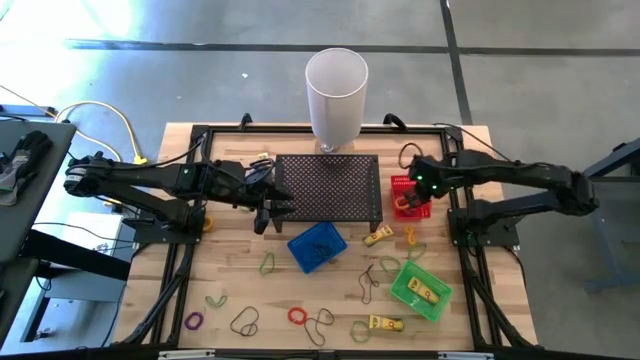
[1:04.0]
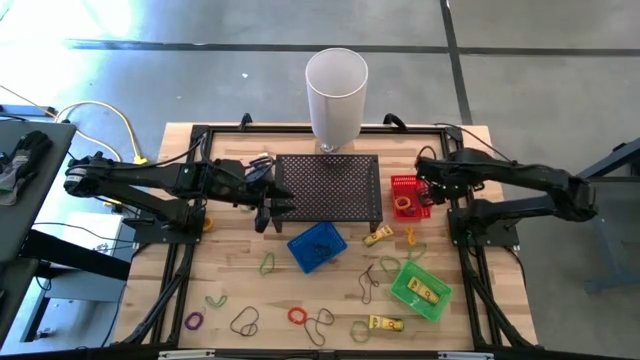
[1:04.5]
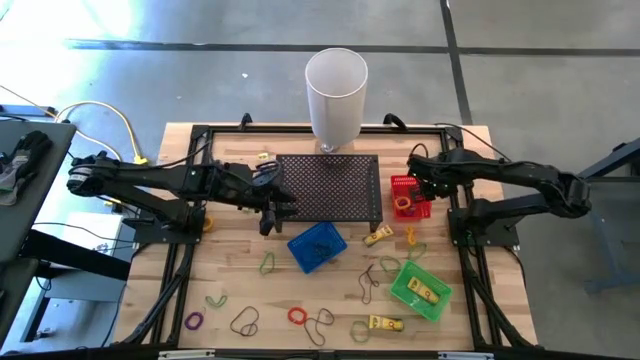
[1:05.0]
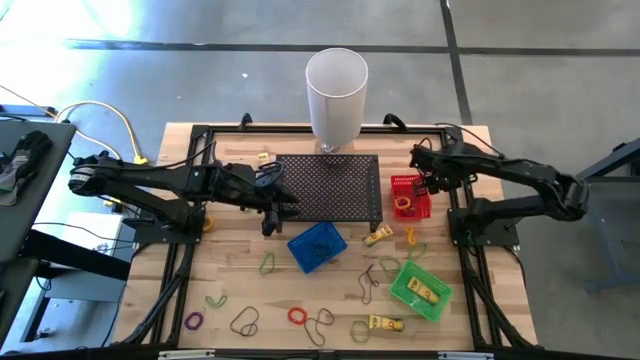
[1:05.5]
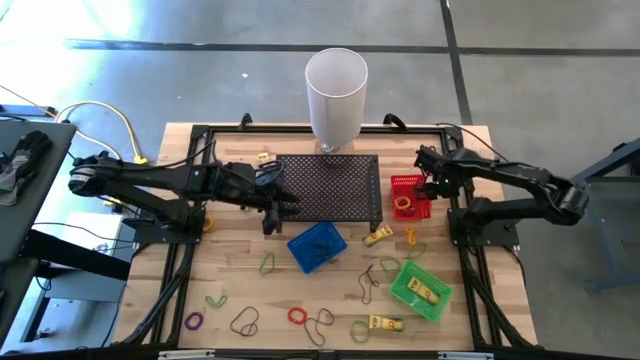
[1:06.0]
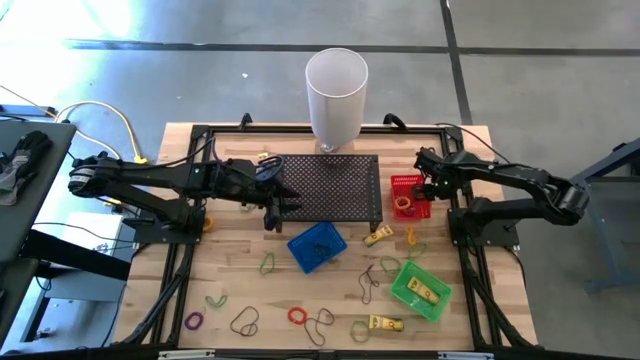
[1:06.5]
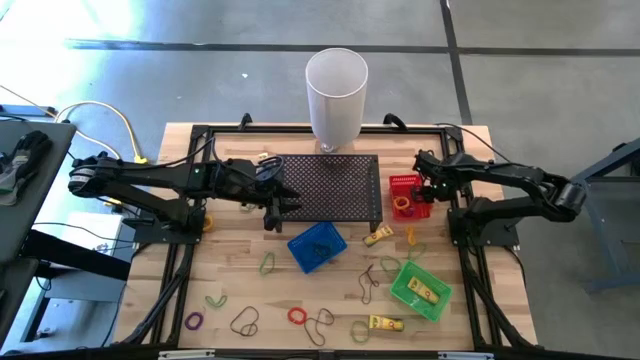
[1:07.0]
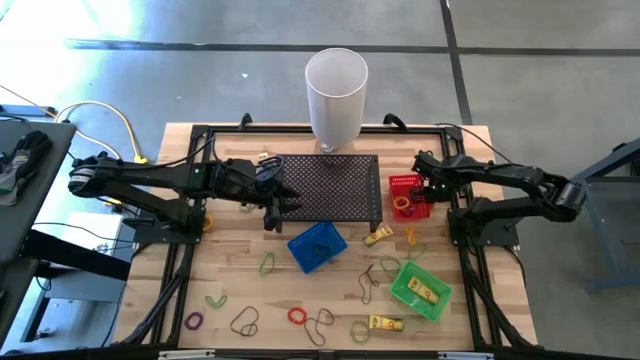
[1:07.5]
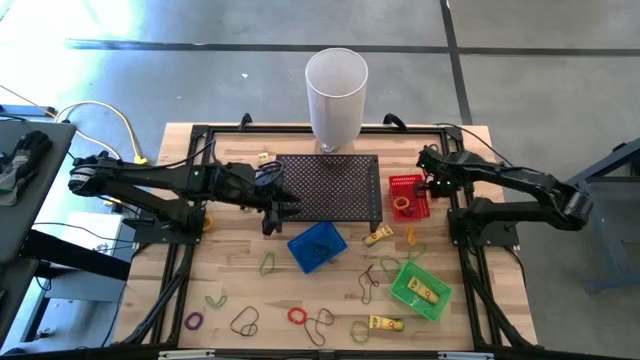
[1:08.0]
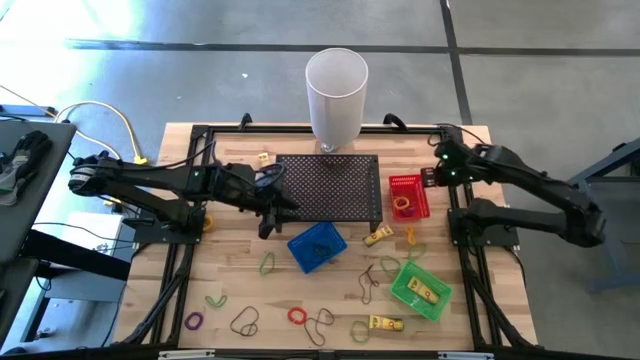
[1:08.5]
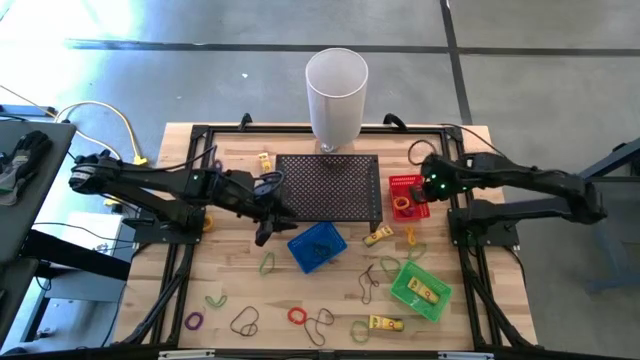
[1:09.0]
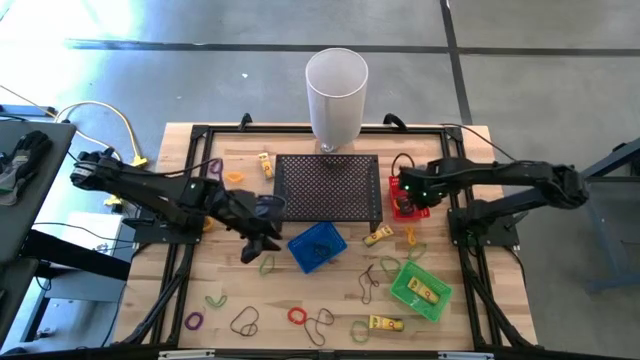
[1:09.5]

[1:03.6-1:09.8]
Task: Pick & Place Office Desk Supplies
Put the orange spring keychain into the red bin

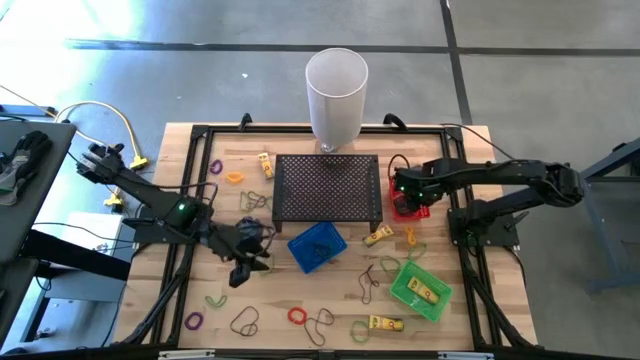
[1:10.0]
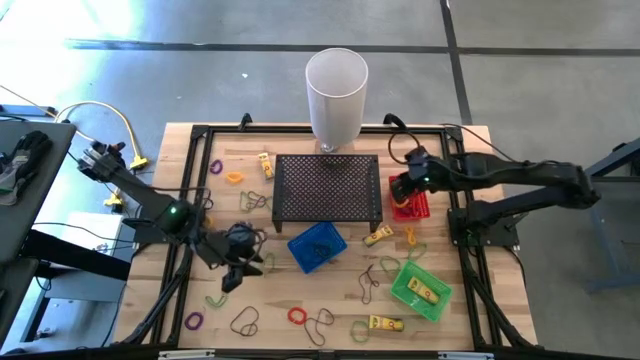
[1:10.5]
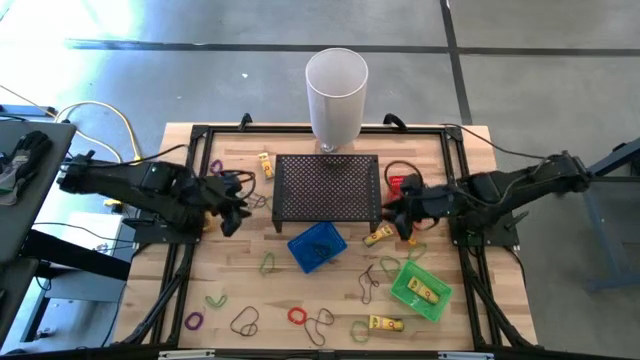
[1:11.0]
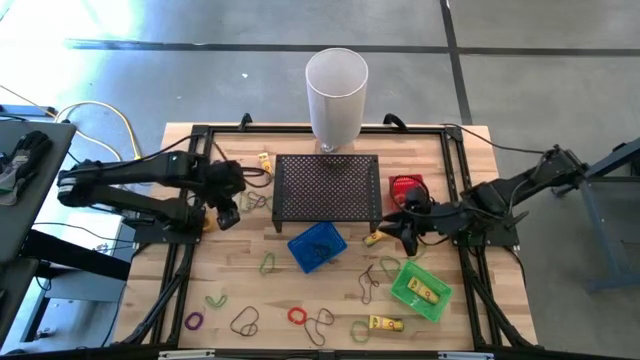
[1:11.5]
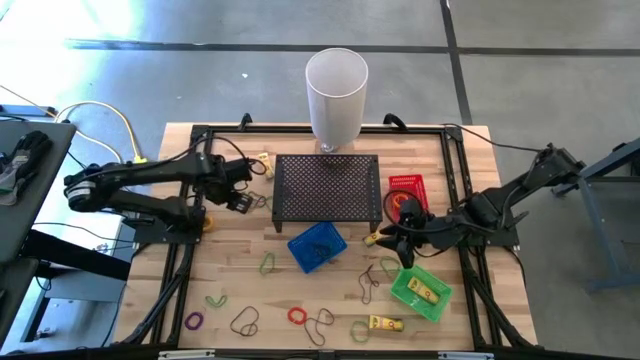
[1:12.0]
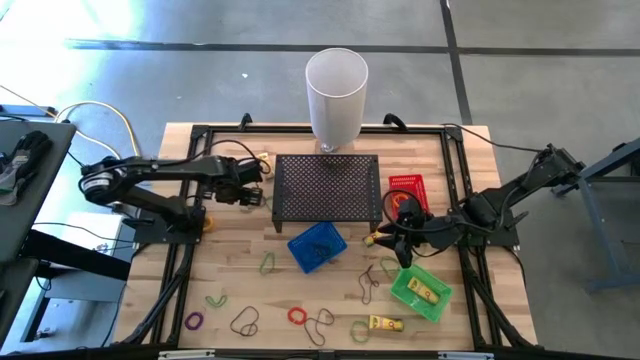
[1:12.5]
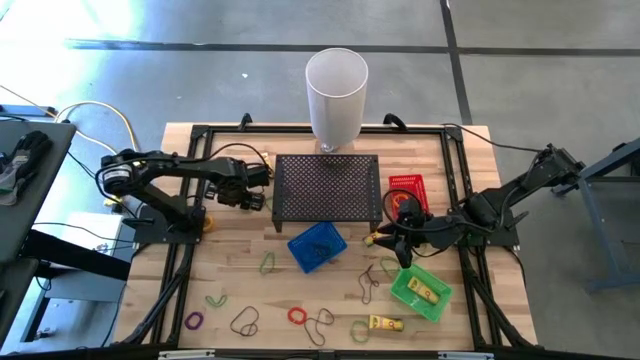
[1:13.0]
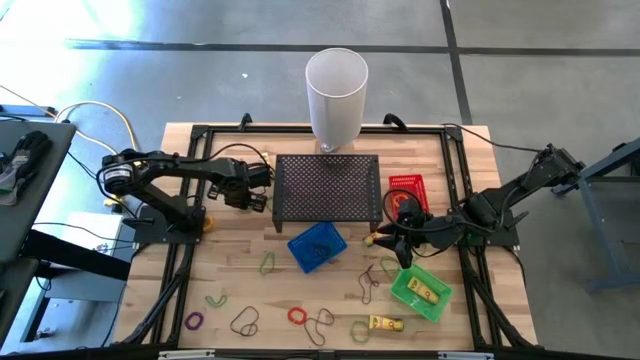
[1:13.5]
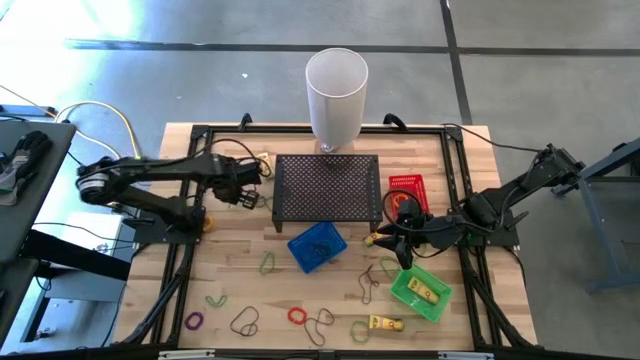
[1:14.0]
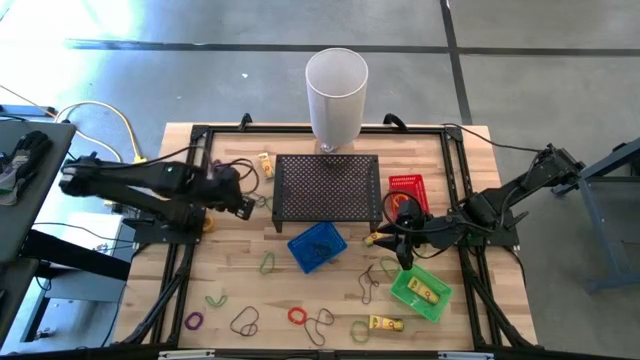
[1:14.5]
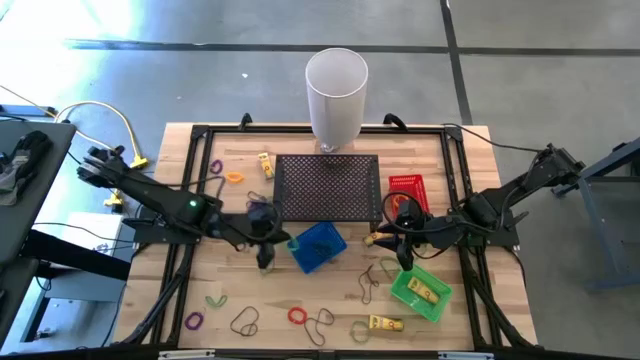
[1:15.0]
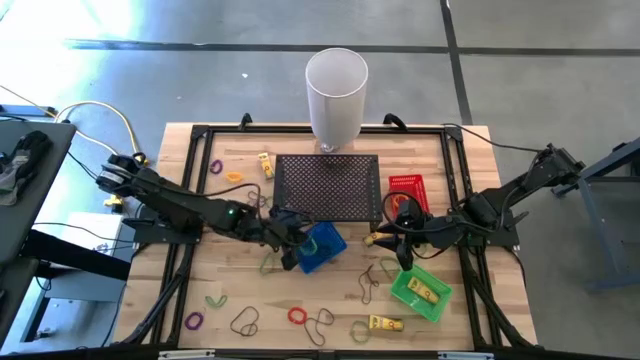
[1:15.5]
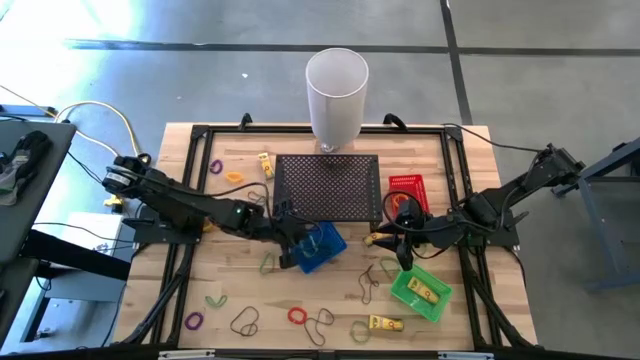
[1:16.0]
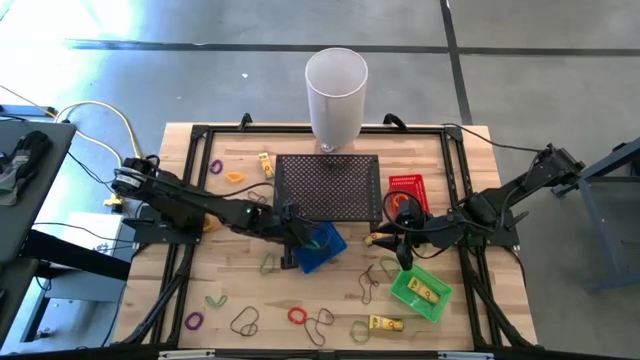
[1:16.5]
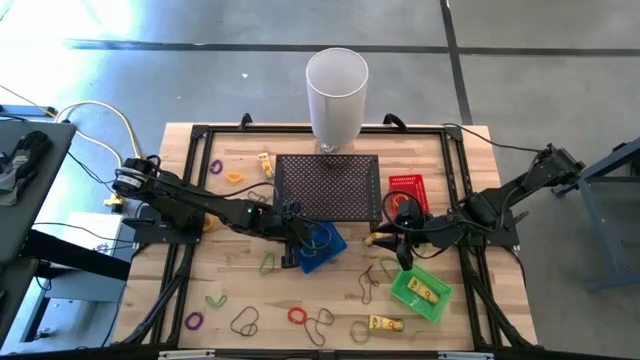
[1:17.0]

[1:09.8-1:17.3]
Put the green rubber band into the blue bin

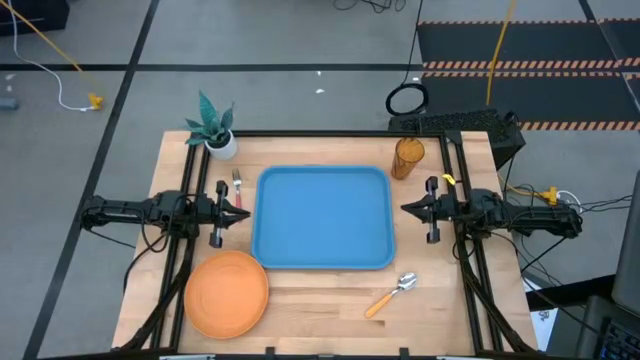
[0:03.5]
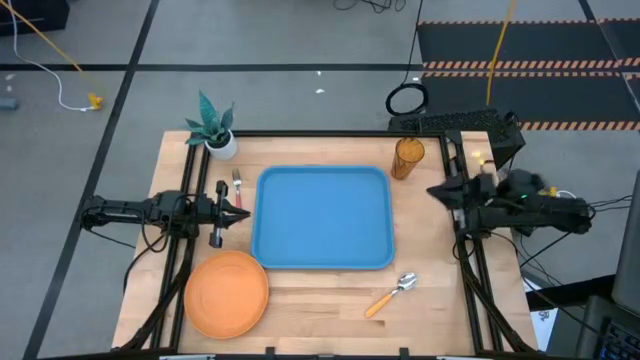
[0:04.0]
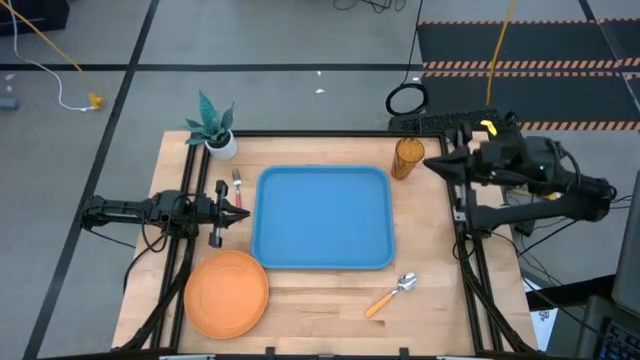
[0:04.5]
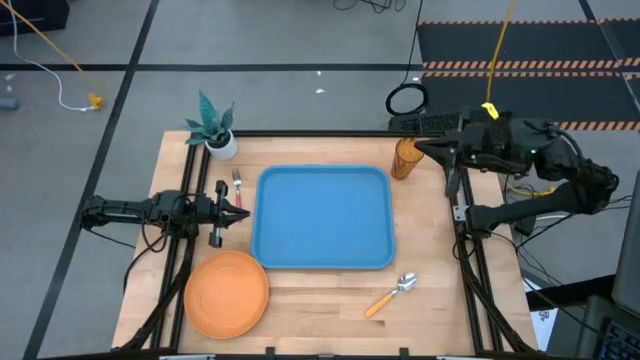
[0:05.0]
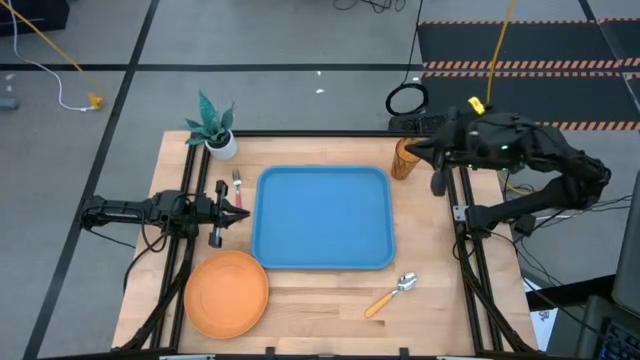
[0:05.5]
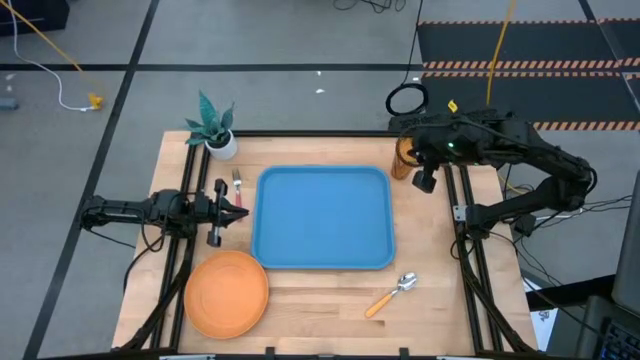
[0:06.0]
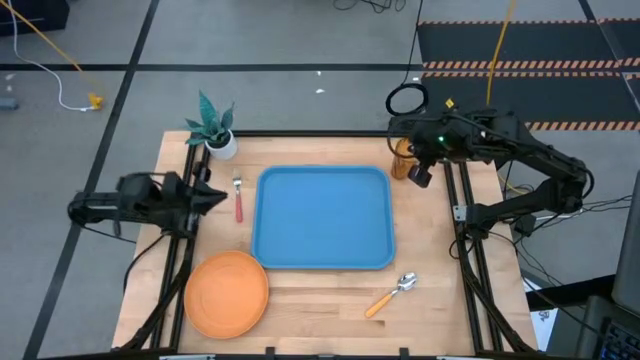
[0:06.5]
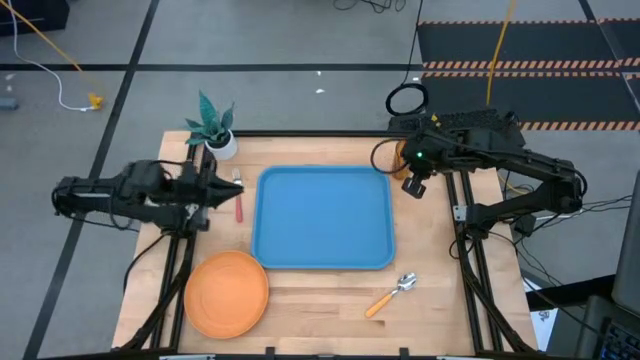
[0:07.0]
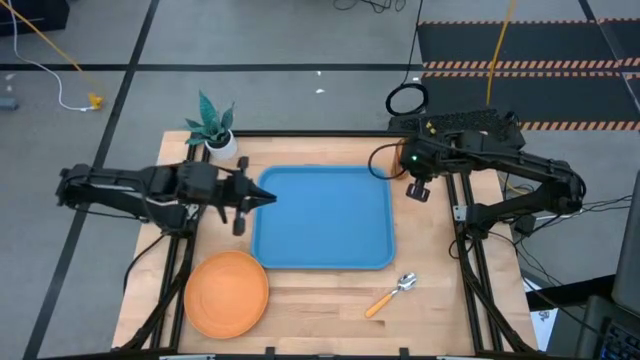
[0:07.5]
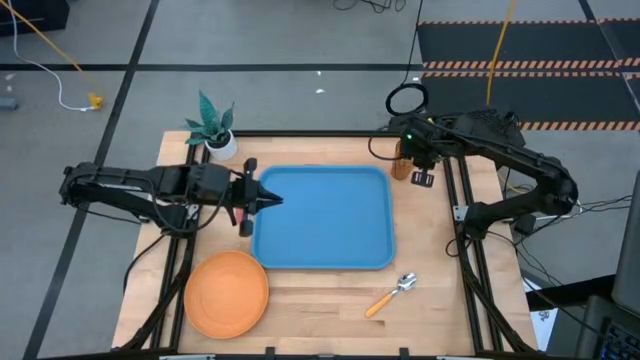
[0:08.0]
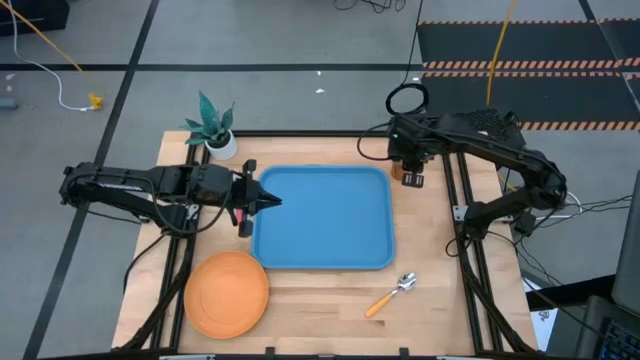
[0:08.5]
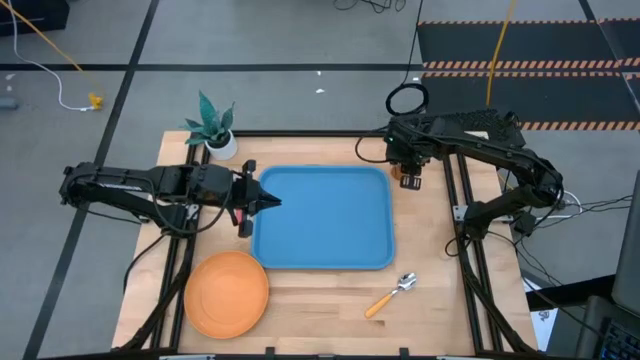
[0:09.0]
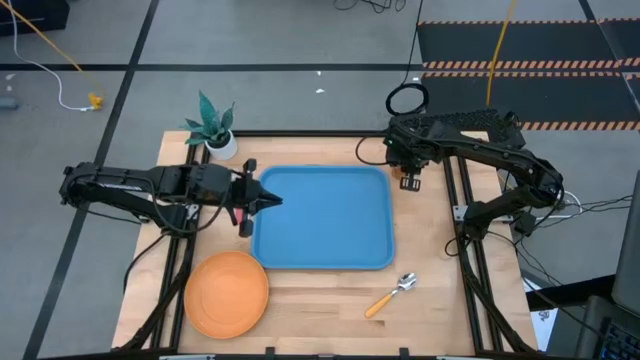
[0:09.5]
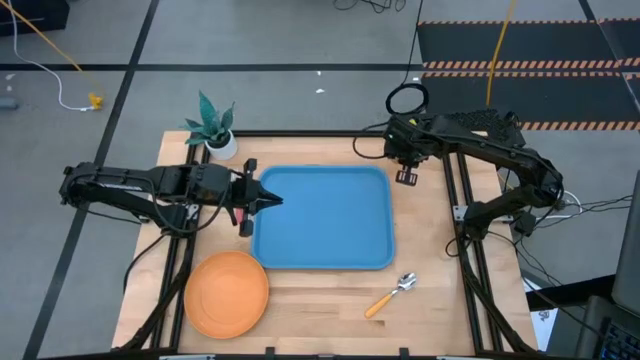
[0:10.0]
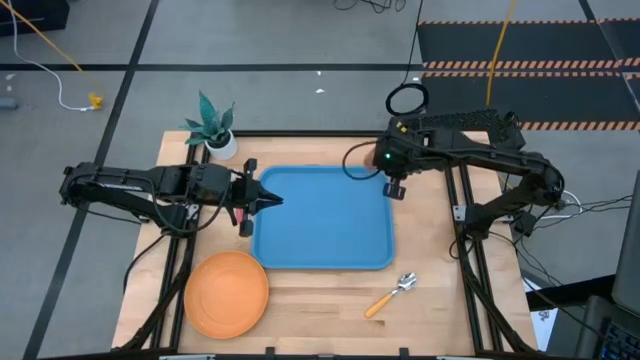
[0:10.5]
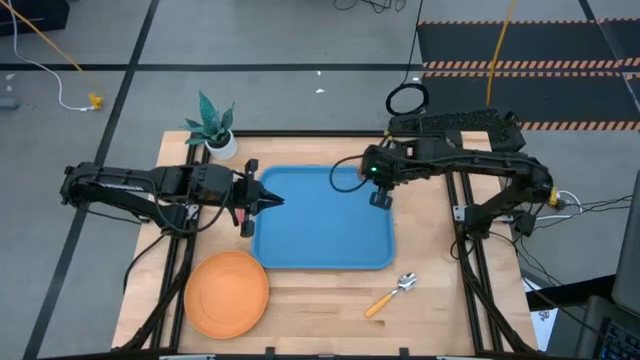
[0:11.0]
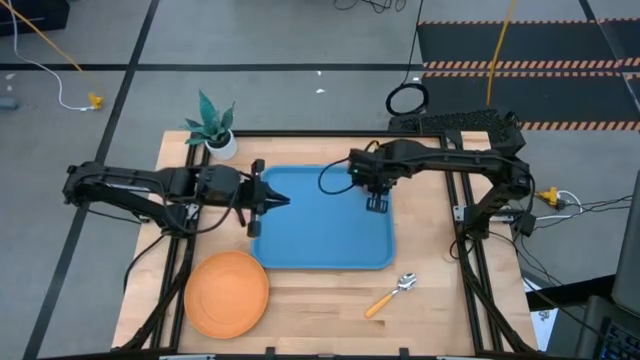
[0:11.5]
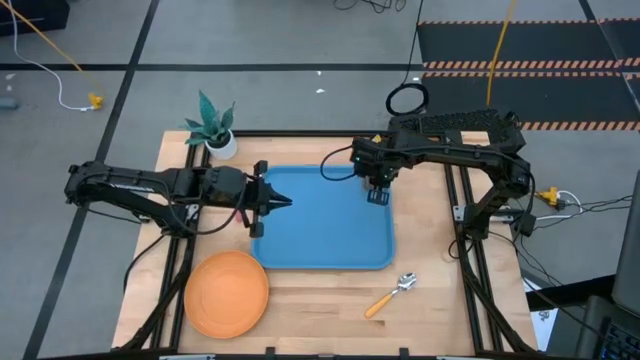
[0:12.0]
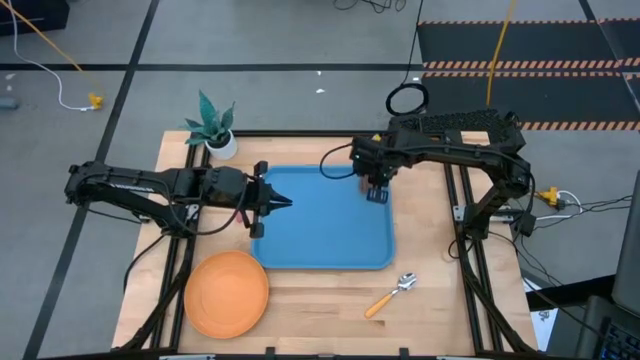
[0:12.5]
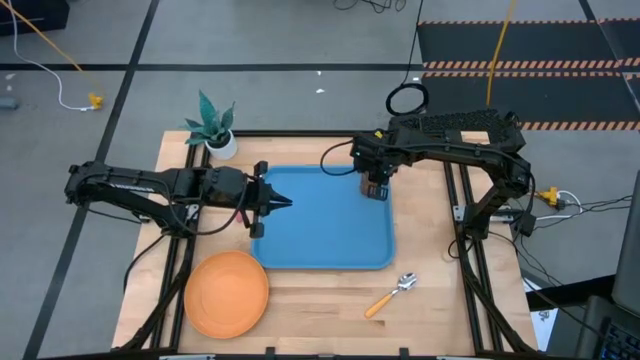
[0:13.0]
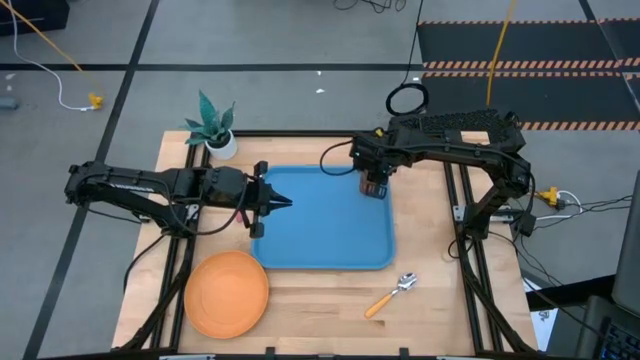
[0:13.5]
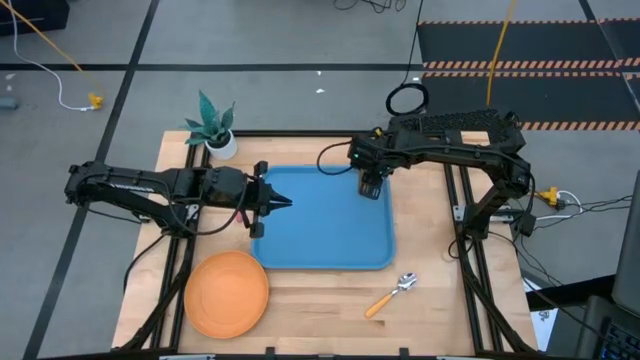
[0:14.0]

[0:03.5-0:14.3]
Task: Pick and place plate/cup/fork/spoon on tray
Put the brown cup on the blue tray
